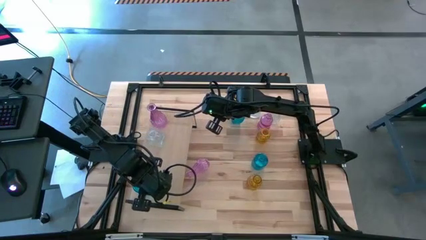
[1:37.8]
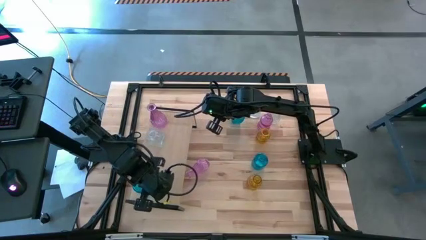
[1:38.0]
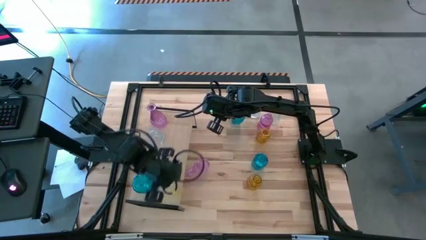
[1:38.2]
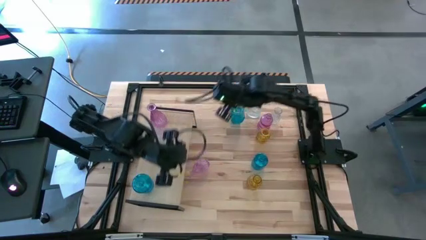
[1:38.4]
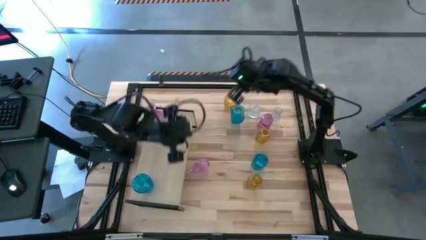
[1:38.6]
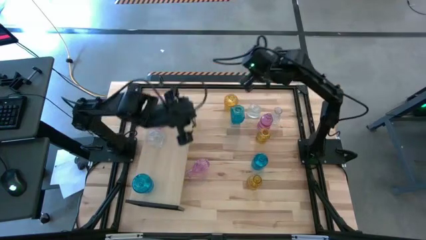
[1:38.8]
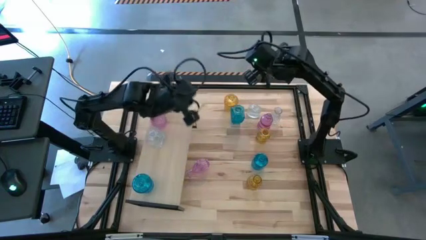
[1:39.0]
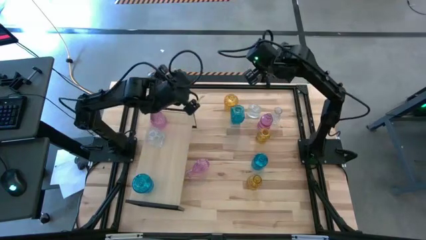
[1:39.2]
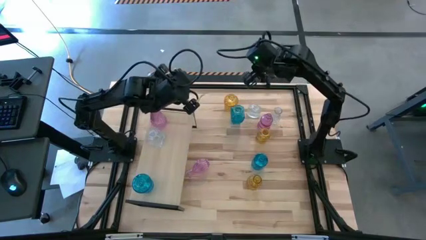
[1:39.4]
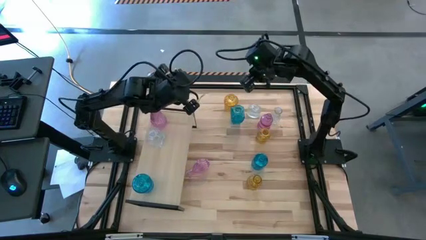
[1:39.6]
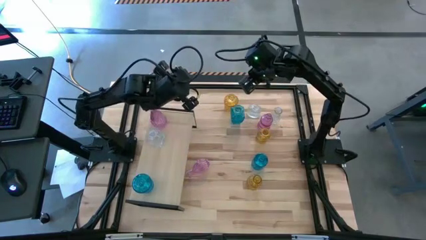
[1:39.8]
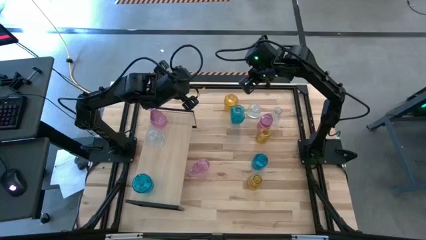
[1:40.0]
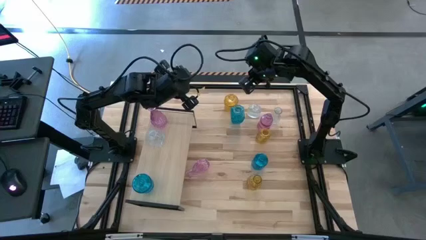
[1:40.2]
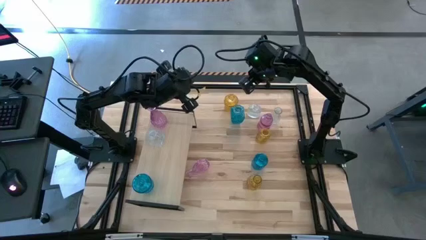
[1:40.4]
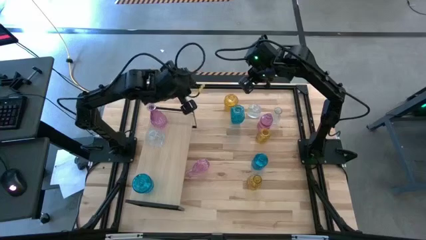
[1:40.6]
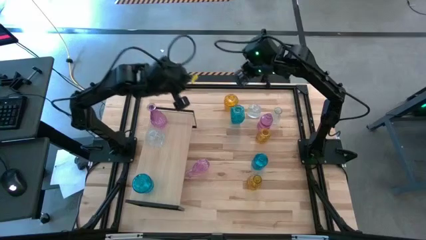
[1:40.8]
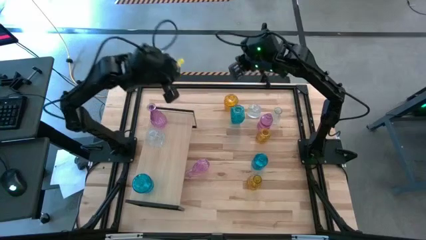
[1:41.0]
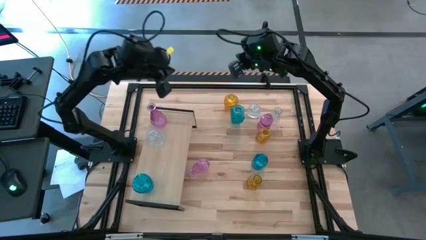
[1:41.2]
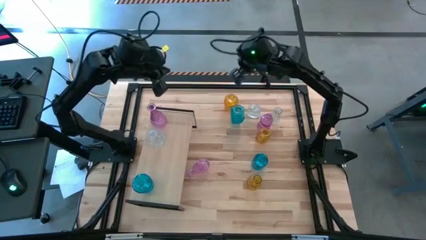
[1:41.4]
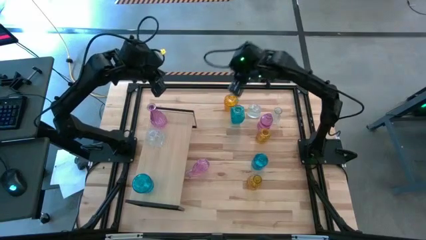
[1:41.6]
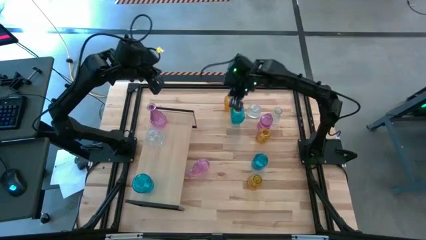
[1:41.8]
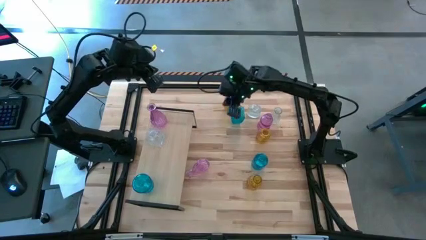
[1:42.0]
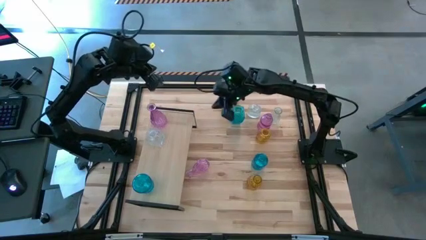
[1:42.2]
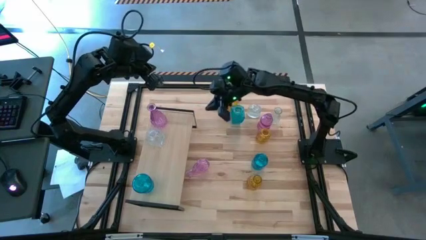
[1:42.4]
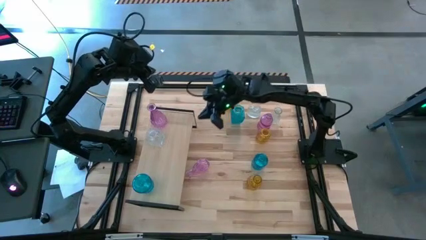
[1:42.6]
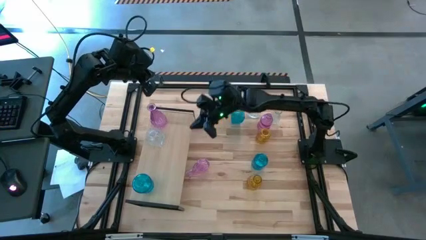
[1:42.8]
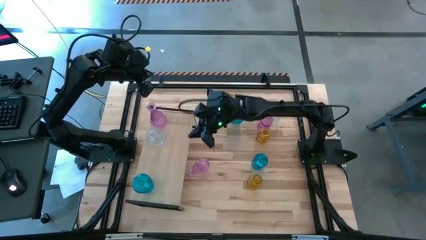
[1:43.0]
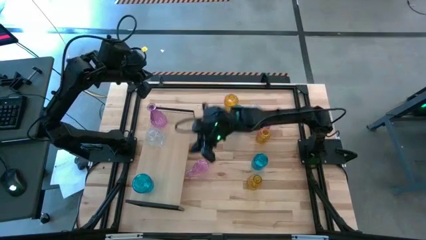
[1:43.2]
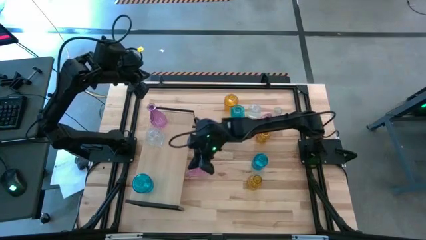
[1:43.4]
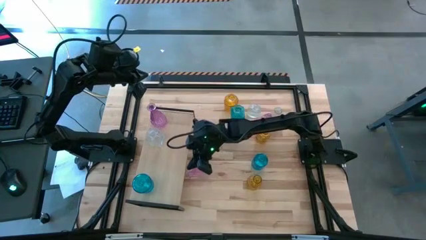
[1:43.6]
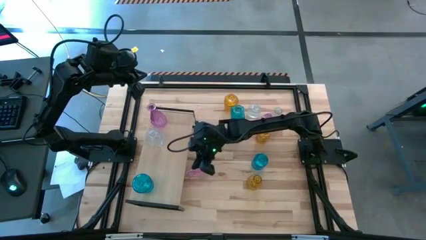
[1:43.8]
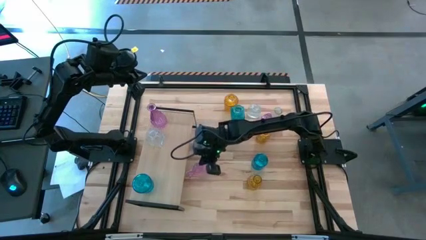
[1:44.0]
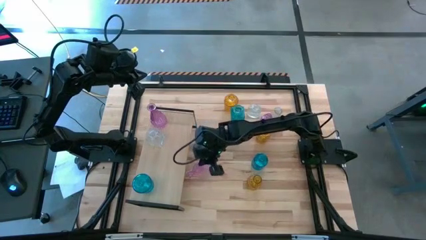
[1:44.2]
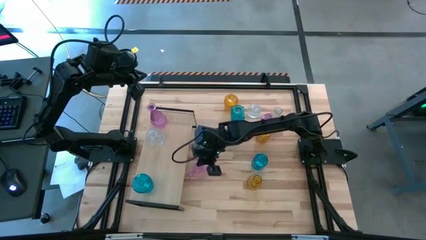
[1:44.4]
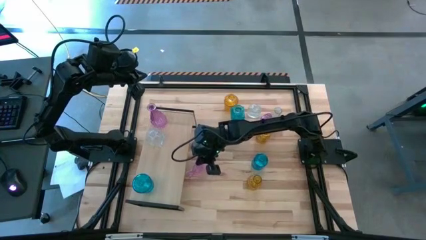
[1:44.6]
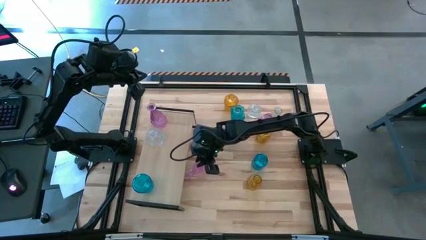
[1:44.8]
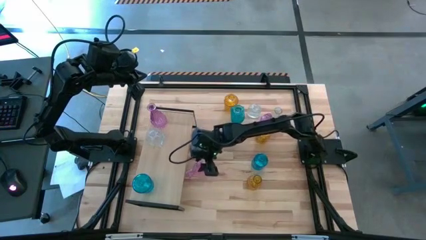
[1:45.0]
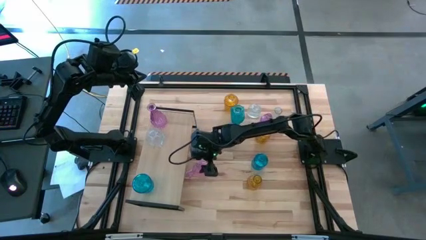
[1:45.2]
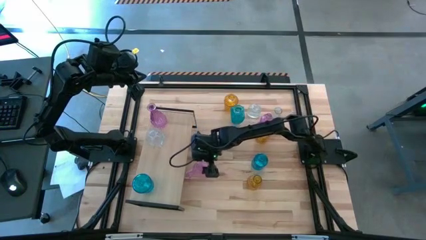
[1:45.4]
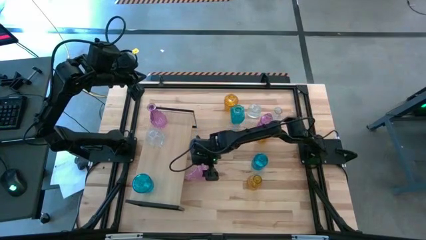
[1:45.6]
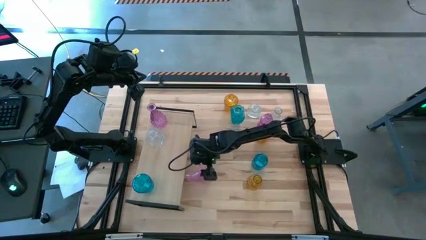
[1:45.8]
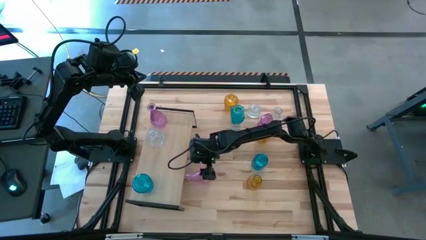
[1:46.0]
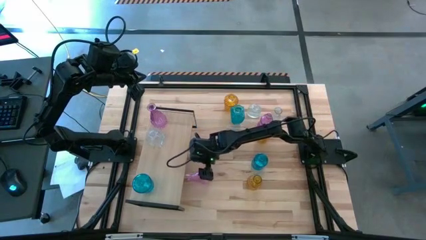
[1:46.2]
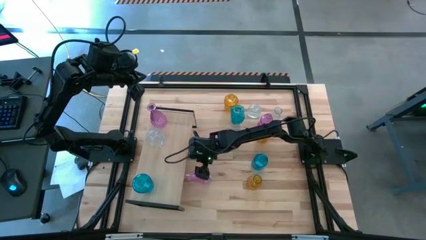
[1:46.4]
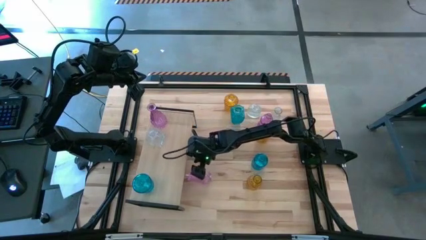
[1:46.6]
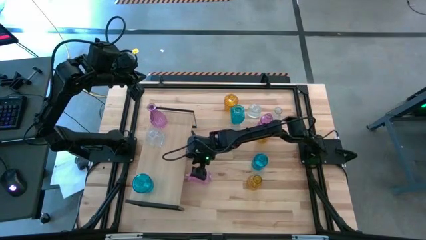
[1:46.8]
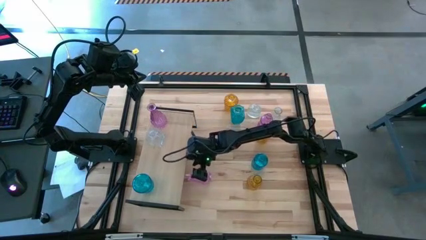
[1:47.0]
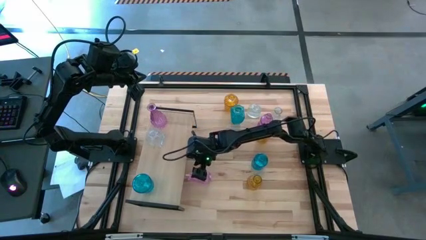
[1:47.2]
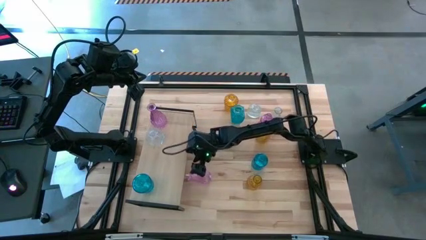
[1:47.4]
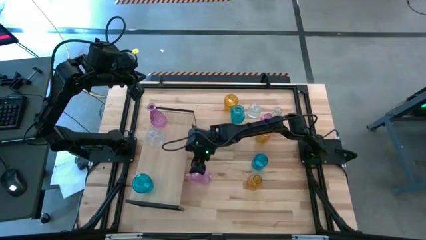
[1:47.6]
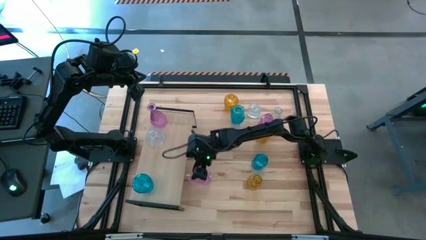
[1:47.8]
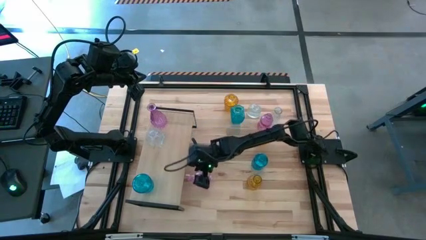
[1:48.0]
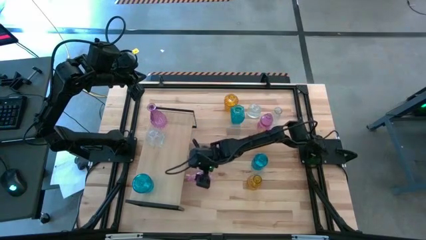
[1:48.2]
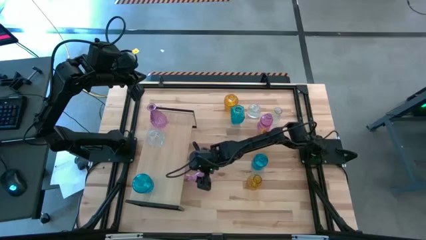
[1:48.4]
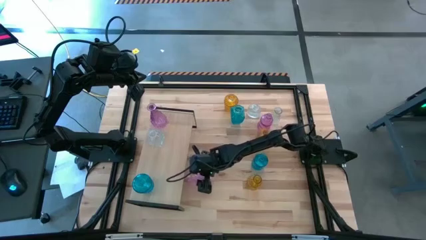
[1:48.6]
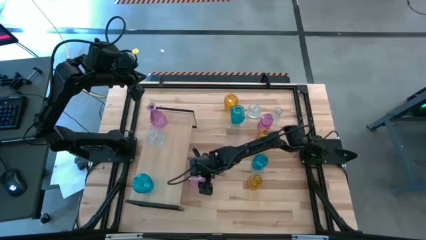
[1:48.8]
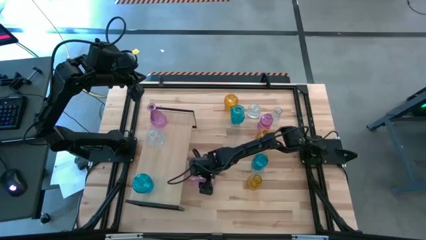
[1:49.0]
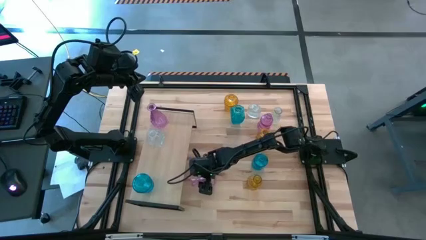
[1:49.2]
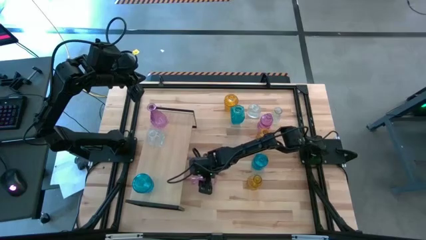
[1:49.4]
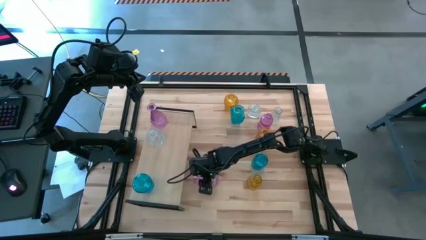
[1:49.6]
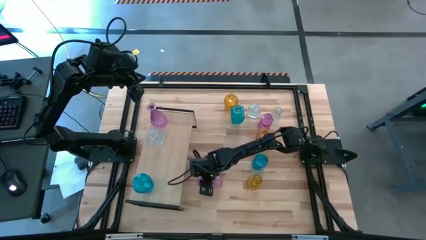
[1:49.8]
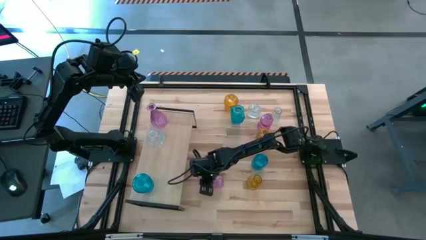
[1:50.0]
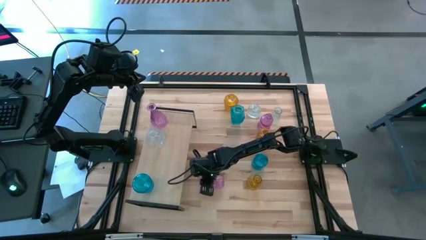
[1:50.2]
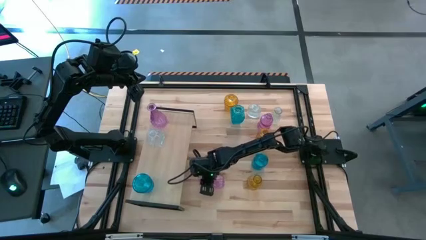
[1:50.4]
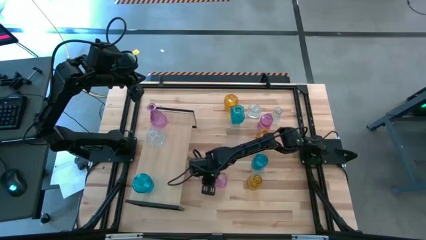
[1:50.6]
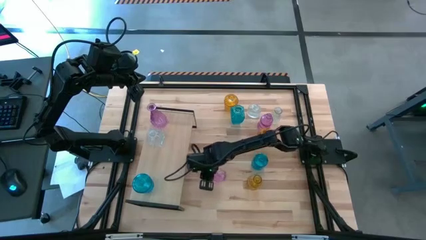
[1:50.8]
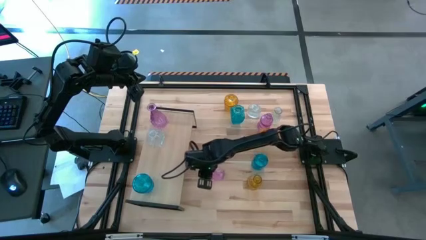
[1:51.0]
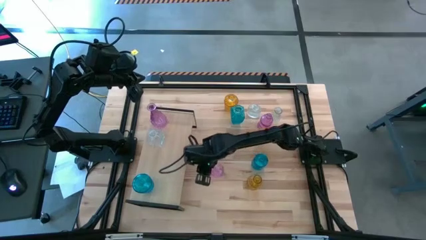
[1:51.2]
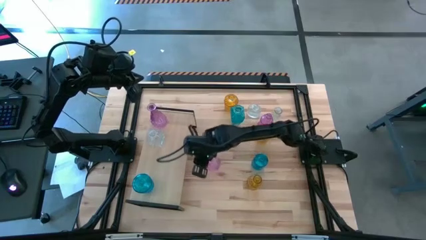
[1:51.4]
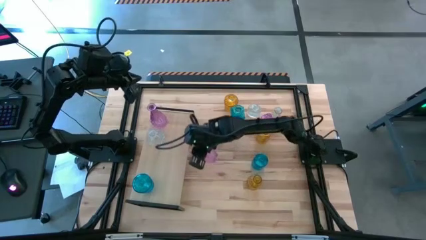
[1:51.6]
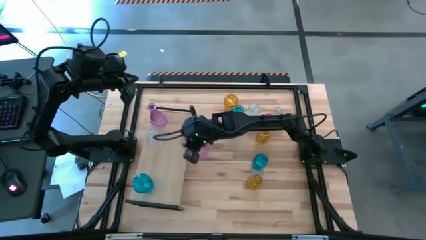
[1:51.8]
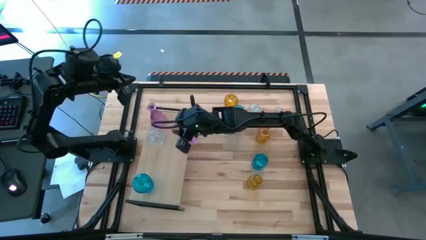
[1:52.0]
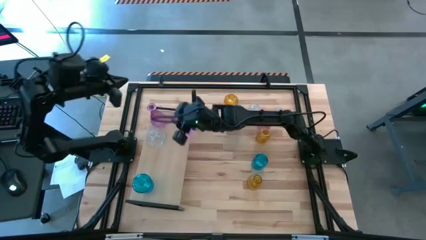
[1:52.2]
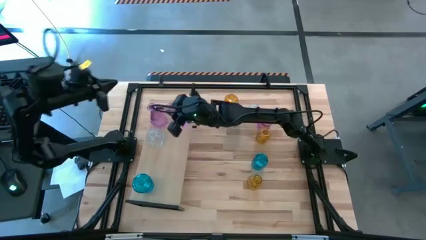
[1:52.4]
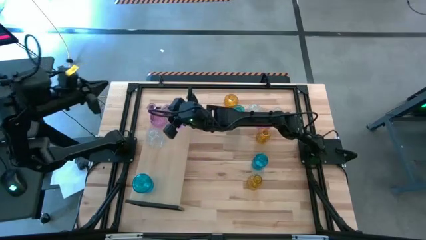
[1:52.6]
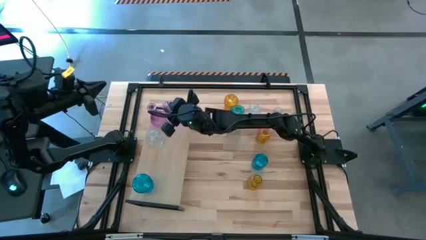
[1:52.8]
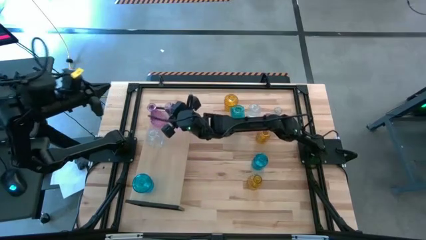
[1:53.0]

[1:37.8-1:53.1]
Task: sort vases onto shelf
Put the left violet flower vase on the shelf
